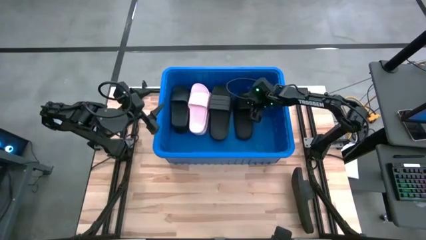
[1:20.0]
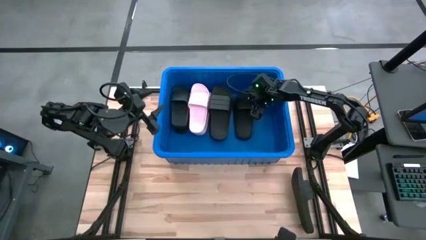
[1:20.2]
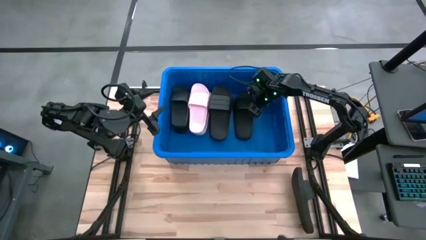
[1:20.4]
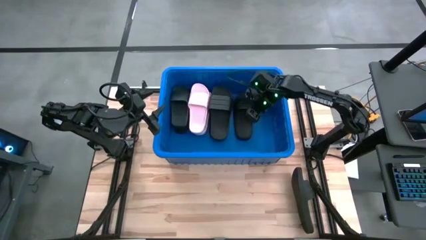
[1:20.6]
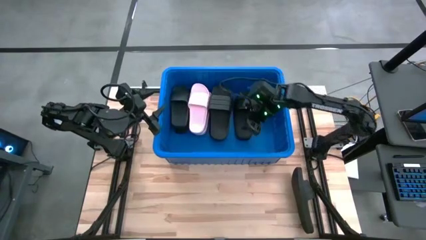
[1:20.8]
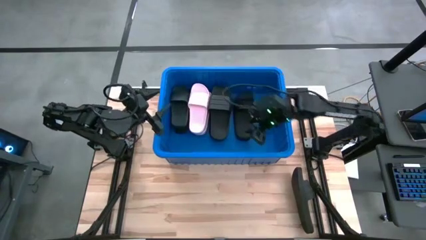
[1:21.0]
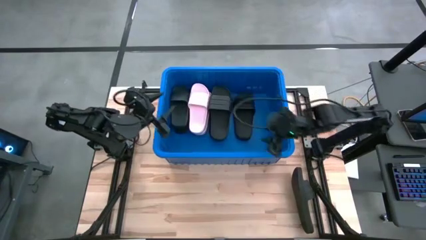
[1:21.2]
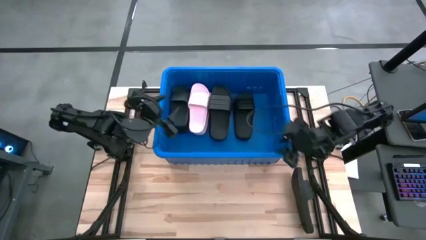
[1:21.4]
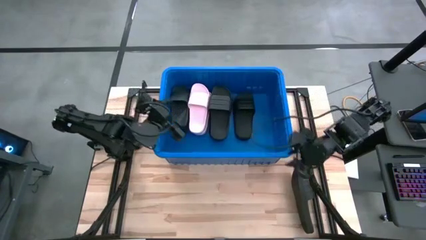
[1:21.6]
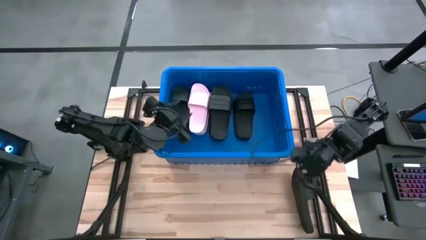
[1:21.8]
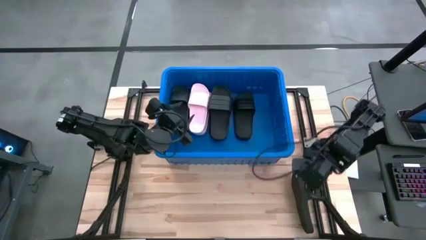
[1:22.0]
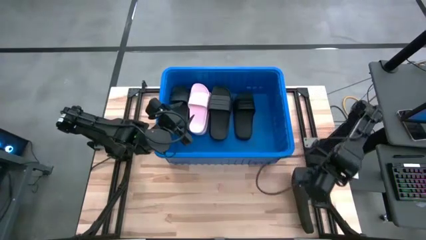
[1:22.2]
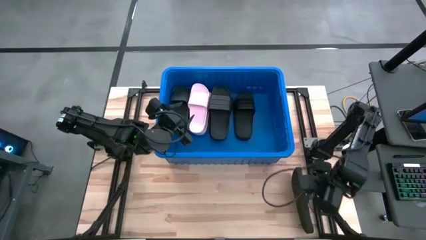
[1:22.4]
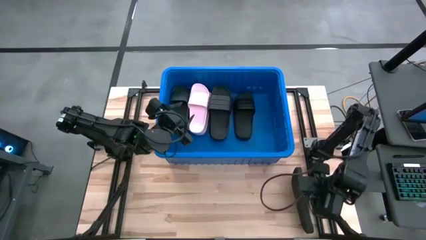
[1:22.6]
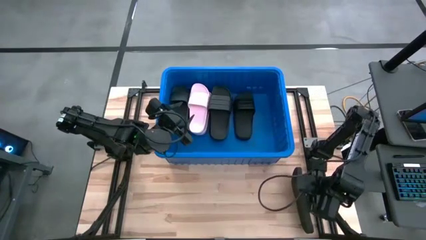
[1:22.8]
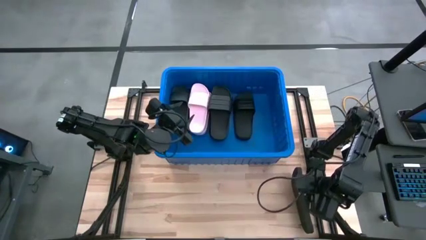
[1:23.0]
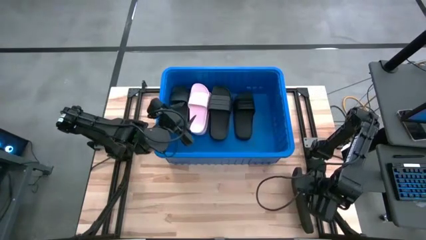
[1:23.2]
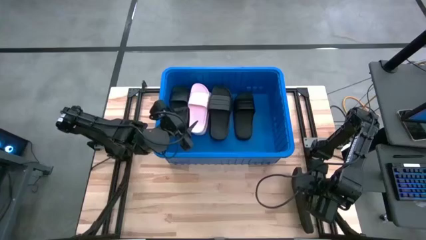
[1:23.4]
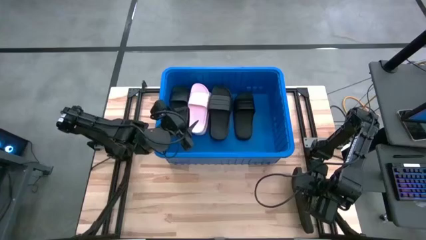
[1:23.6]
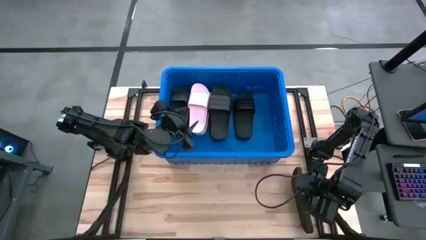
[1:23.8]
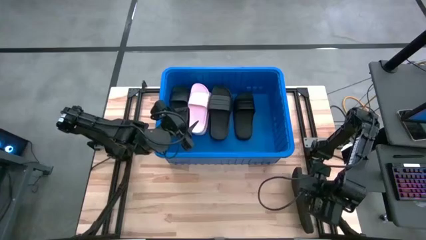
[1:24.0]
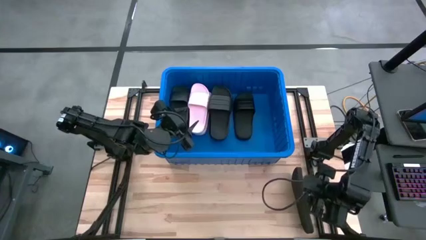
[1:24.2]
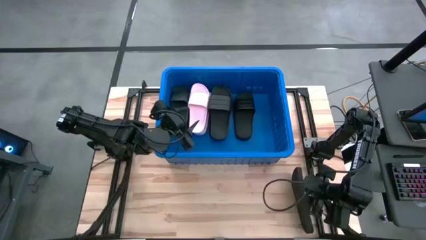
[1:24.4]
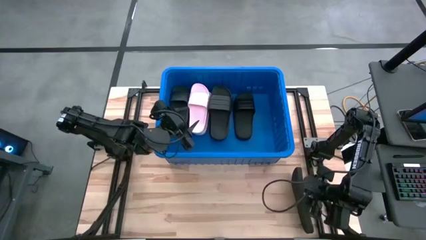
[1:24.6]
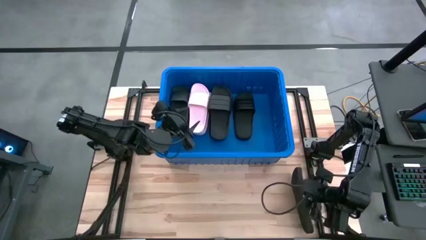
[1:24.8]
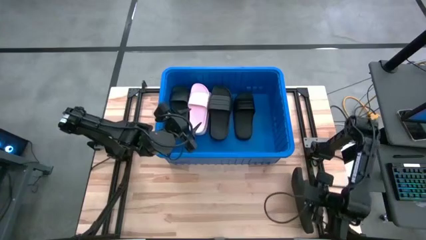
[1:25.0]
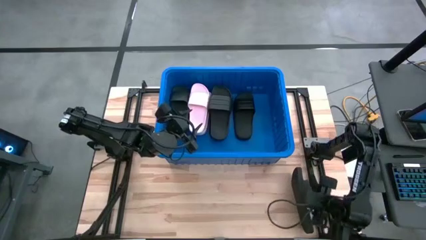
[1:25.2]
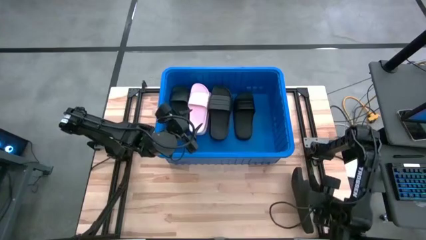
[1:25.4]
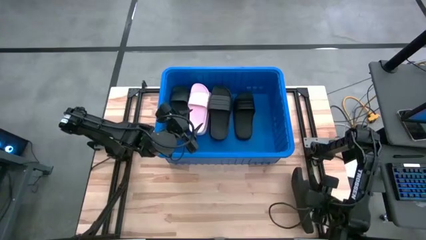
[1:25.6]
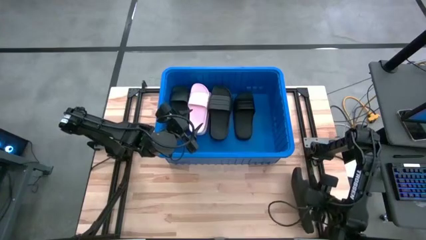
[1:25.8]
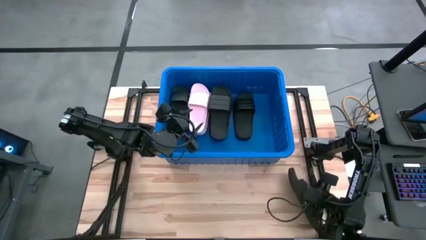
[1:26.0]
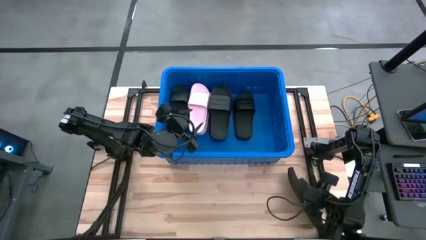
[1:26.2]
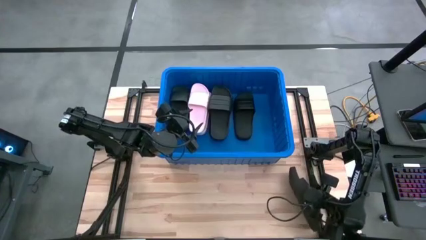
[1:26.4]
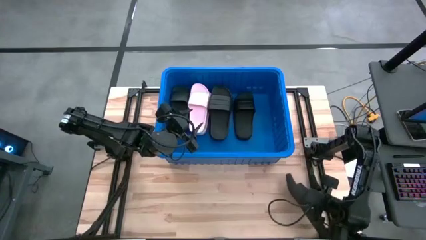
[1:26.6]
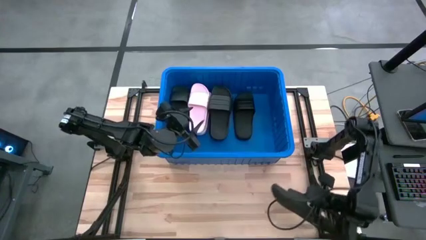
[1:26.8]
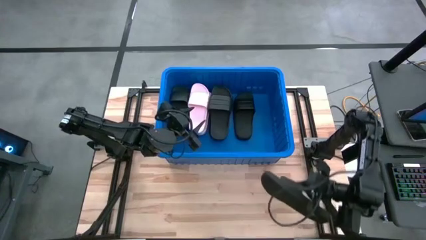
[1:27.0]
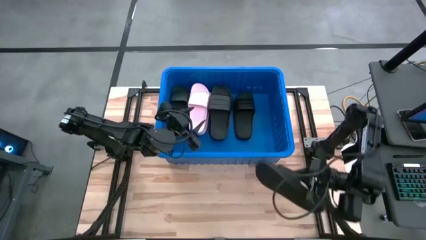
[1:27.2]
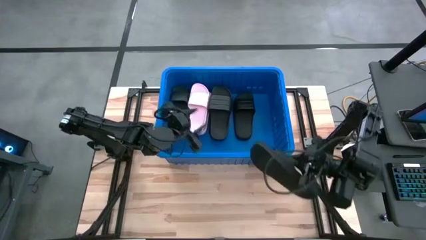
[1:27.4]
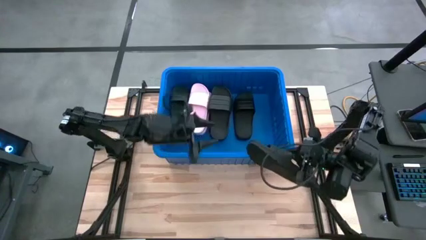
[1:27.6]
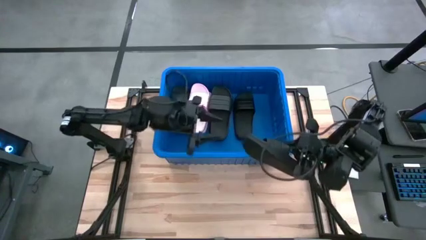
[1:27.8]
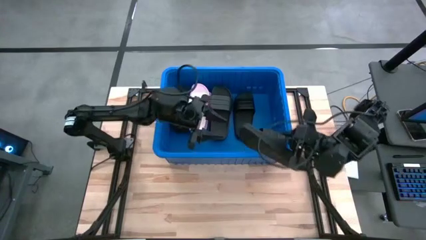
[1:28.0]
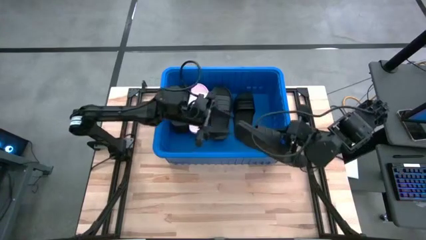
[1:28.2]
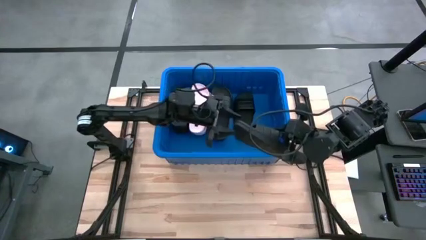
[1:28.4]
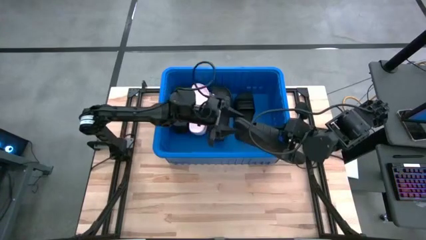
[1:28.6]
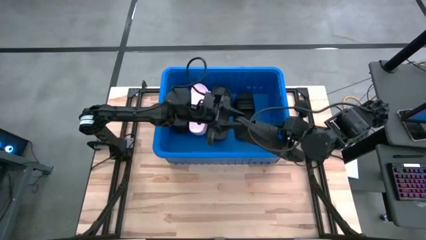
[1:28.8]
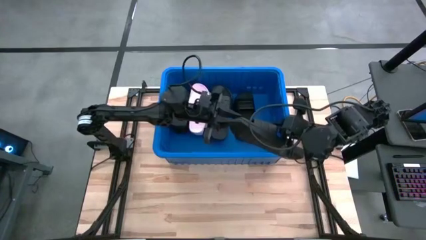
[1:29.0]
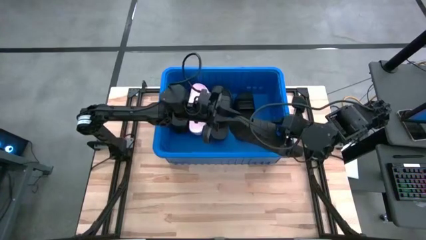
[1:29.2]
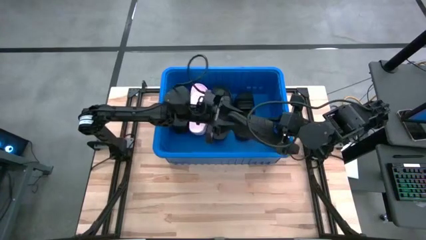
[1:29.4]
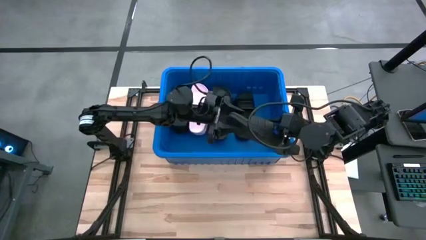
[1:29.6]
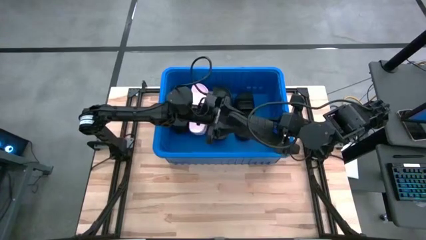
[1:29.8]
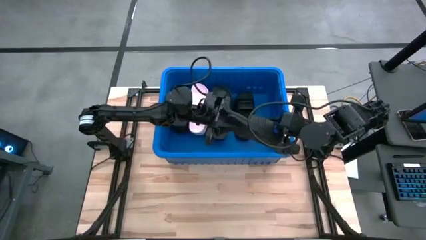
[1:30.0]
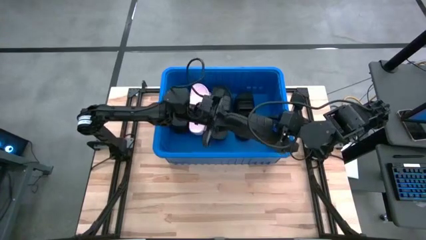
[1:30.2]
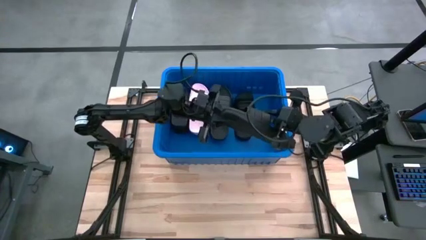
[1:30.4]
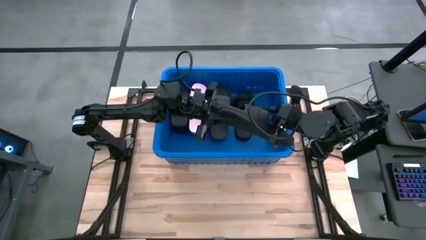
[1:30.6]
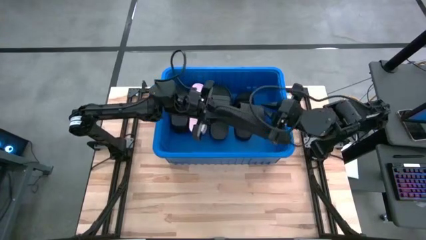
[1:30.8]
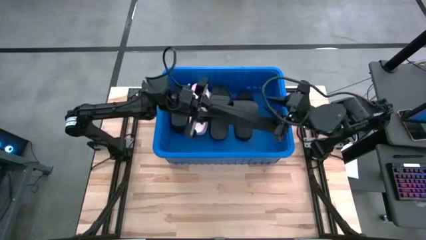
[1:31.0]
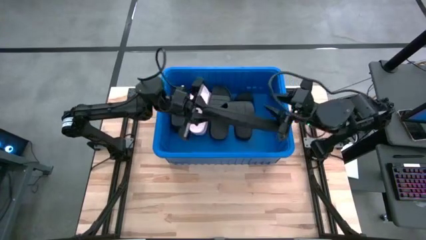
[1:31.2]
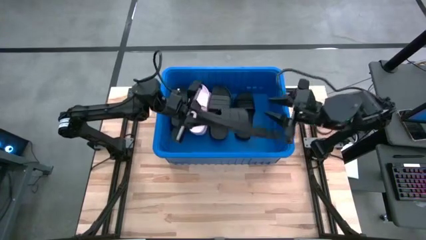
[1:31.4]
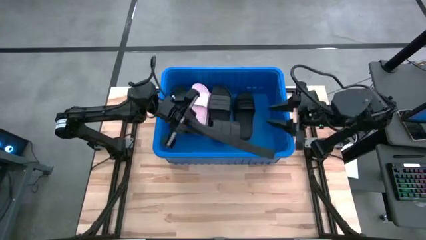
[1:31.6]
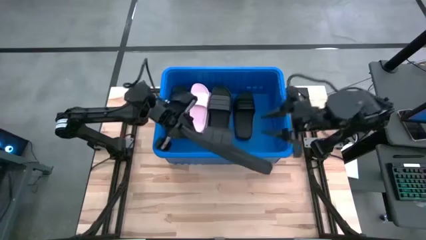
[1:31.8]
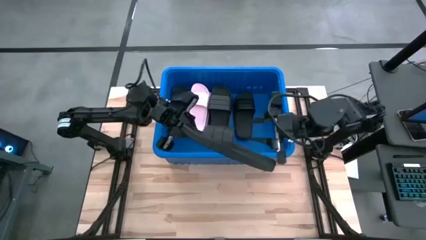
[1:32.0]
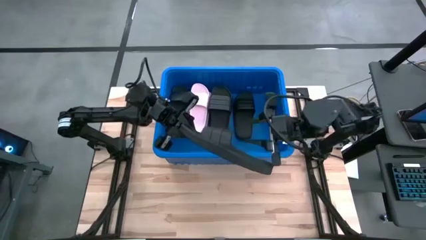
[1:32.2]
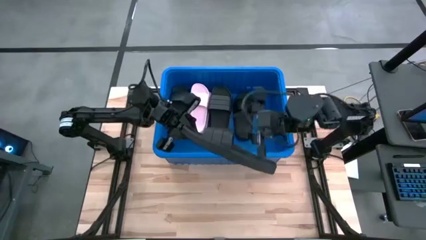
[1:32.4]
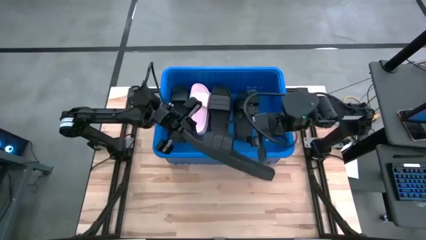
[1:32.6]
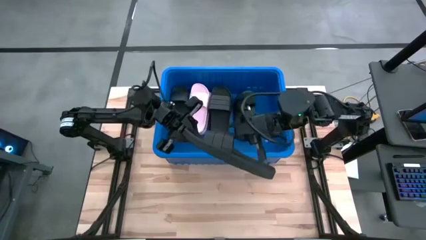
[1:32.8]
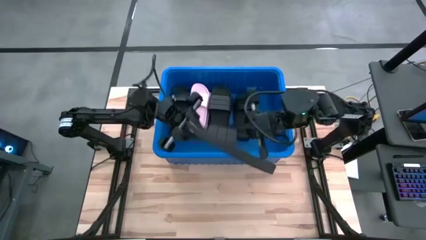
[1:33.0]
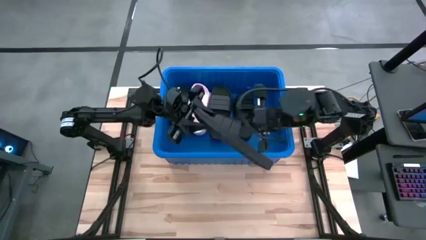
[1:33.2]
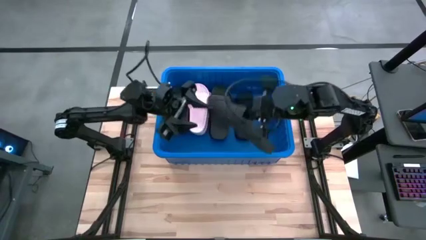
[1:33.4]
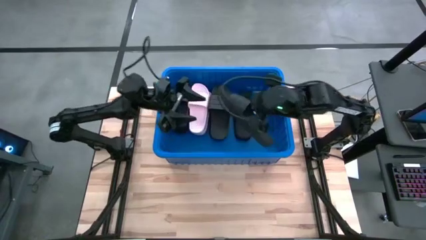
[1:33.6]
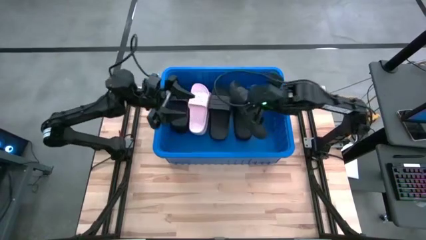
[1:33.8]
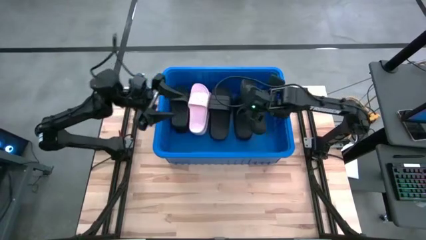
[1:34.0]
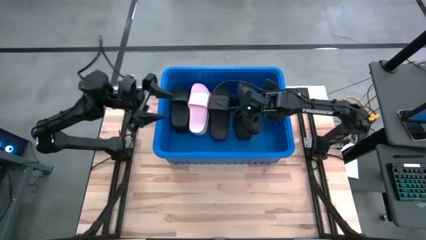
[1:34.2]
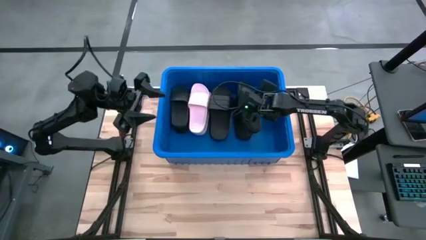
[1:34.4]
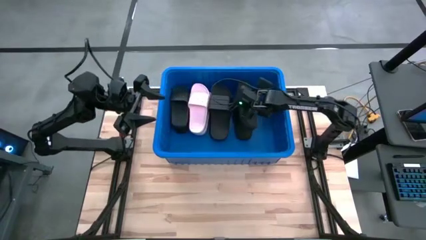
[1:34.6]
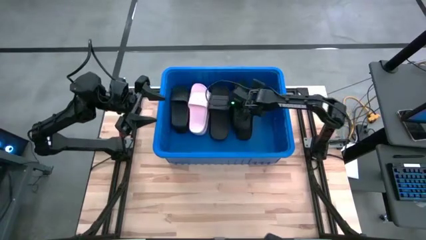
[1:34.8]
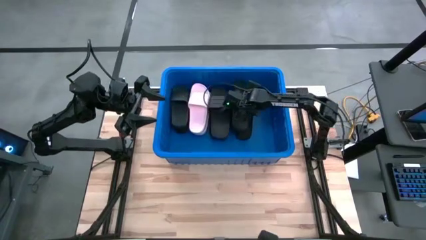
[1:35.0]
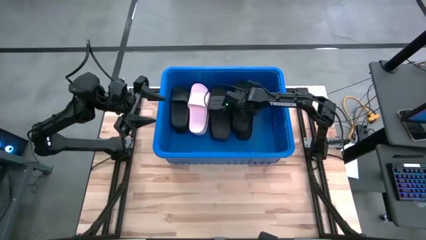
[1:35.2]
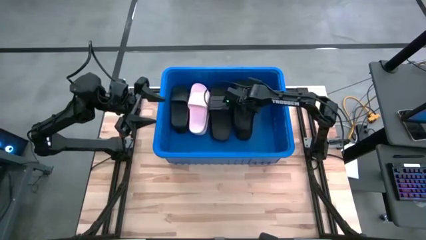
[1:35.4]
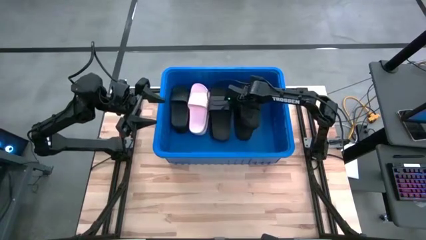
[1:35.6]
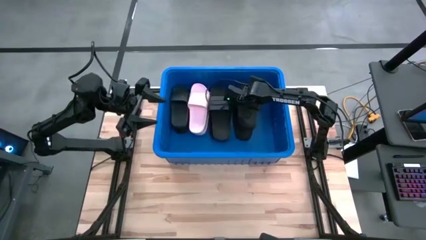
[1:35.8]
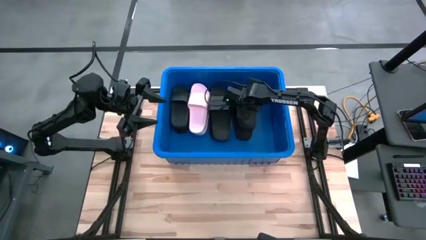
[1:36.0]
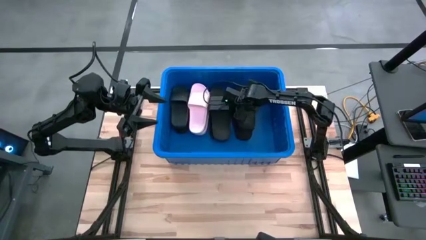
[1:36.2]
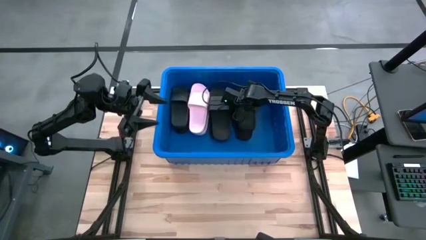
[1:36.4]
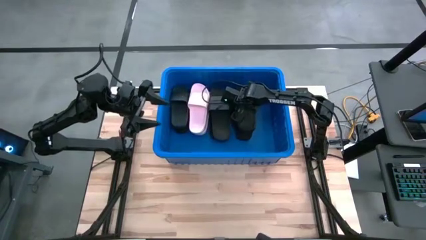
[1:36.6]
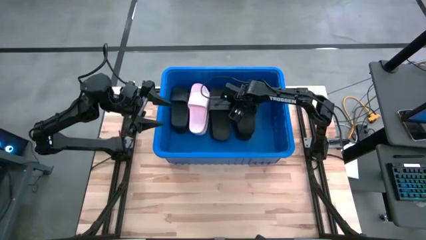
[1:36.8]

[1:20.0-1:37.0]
Task: Pick and place slides into bin
Put the black slipper into the blue container
